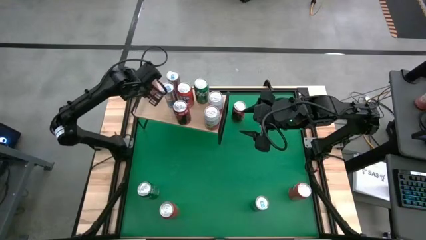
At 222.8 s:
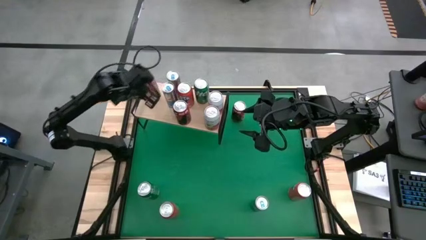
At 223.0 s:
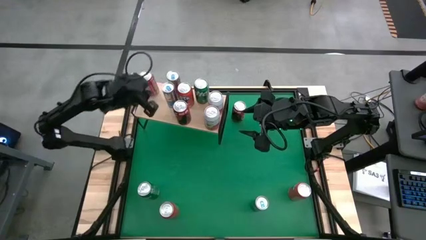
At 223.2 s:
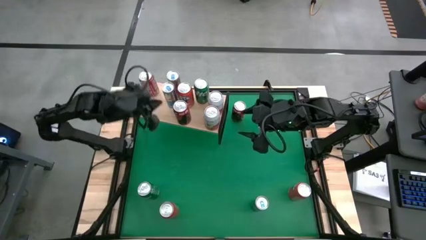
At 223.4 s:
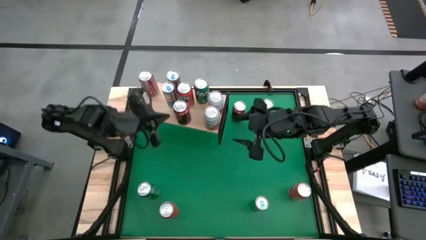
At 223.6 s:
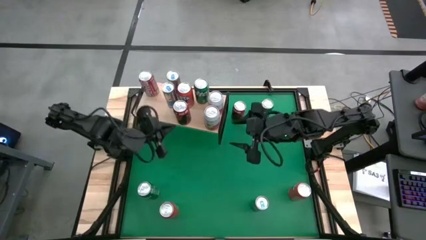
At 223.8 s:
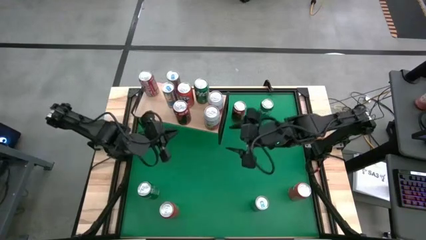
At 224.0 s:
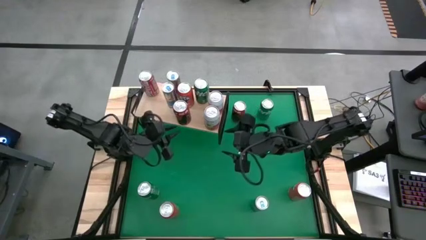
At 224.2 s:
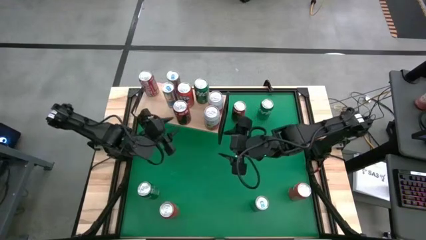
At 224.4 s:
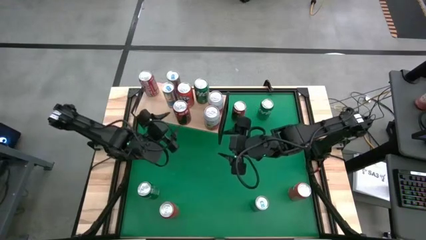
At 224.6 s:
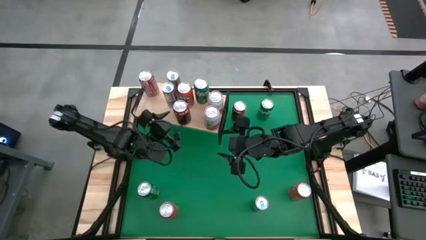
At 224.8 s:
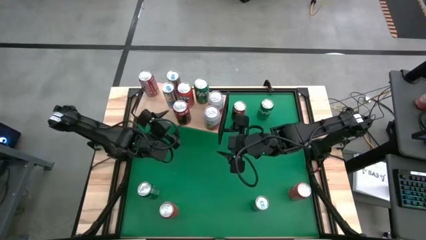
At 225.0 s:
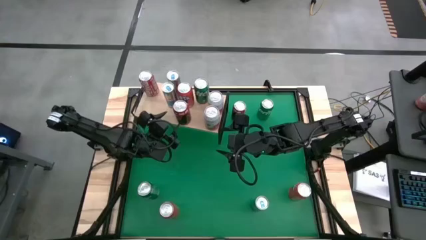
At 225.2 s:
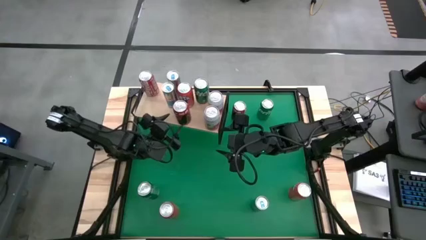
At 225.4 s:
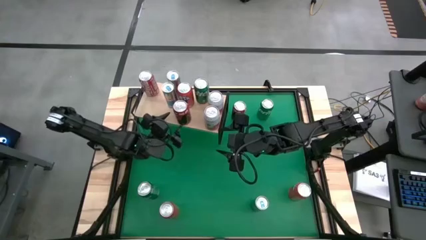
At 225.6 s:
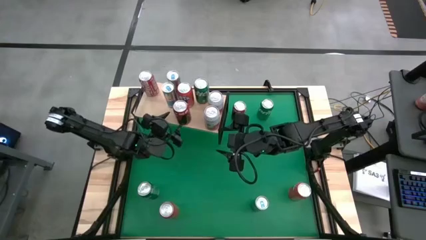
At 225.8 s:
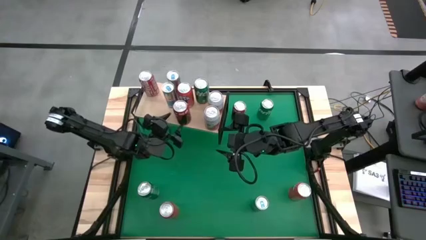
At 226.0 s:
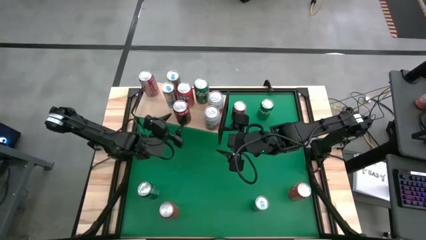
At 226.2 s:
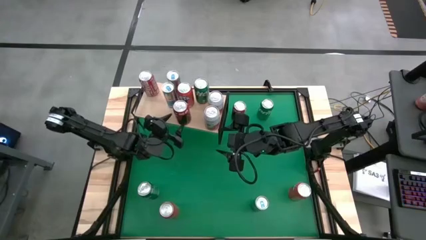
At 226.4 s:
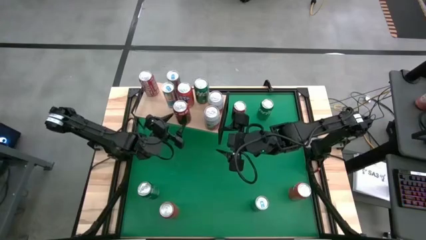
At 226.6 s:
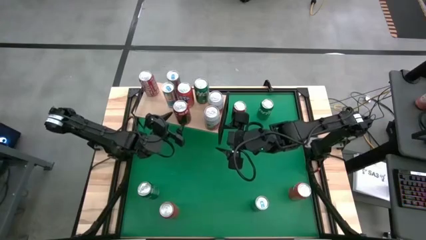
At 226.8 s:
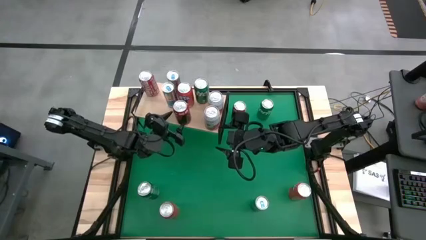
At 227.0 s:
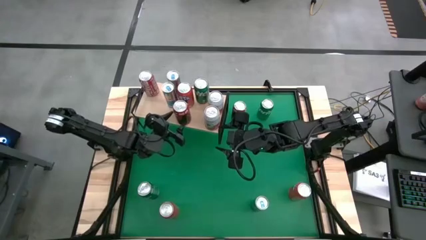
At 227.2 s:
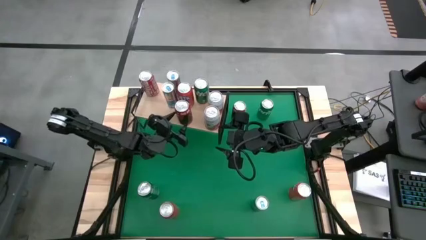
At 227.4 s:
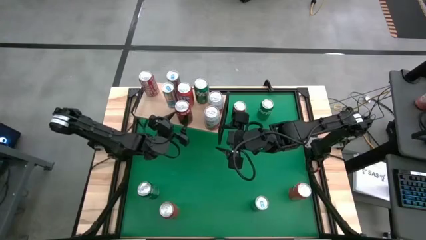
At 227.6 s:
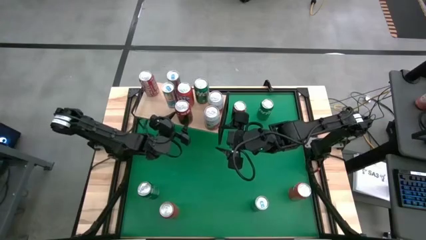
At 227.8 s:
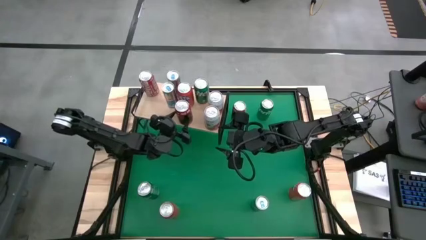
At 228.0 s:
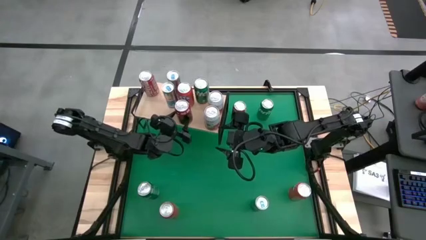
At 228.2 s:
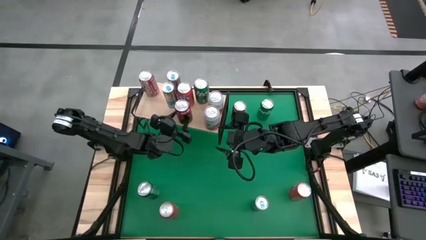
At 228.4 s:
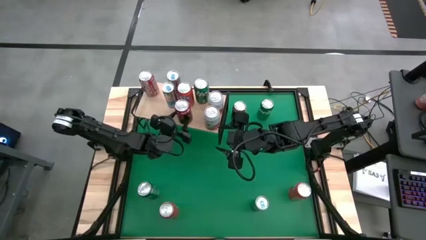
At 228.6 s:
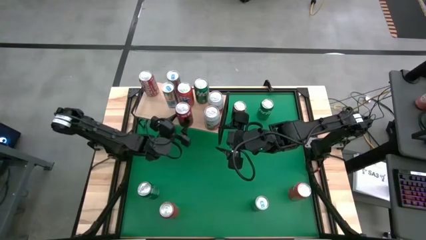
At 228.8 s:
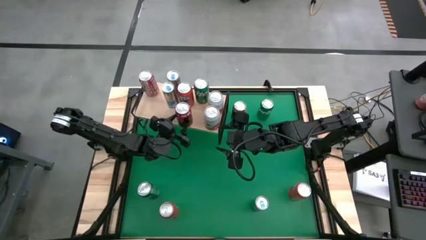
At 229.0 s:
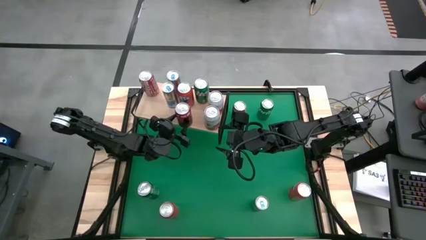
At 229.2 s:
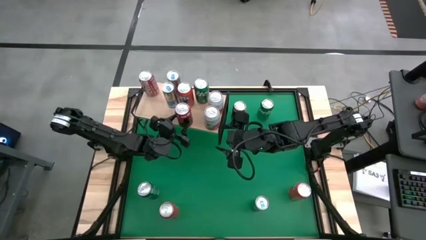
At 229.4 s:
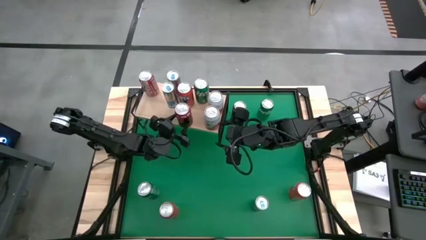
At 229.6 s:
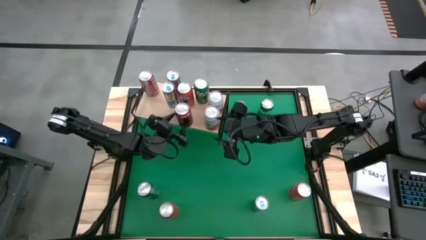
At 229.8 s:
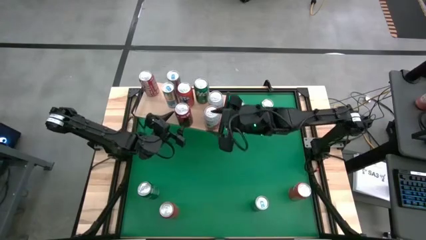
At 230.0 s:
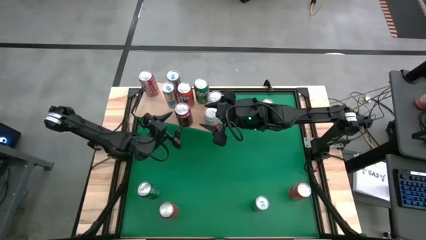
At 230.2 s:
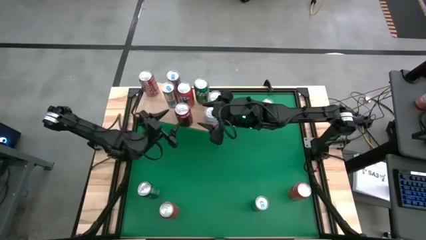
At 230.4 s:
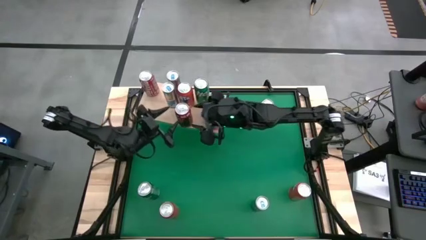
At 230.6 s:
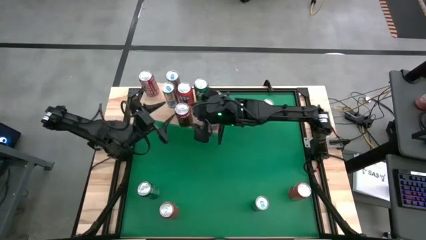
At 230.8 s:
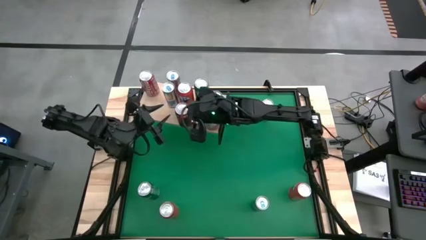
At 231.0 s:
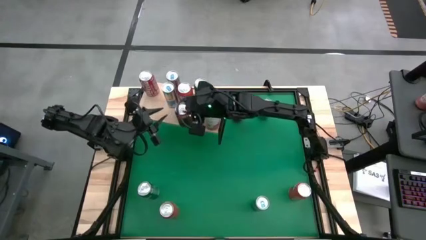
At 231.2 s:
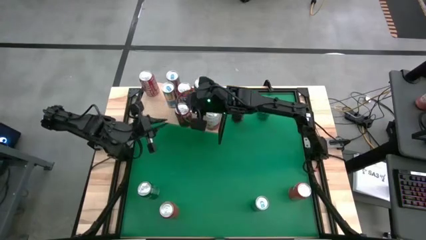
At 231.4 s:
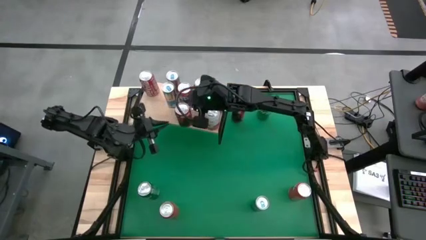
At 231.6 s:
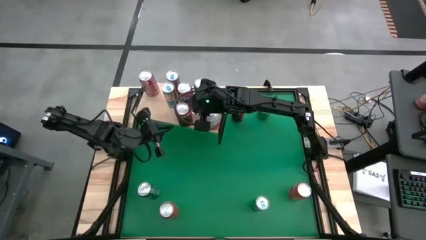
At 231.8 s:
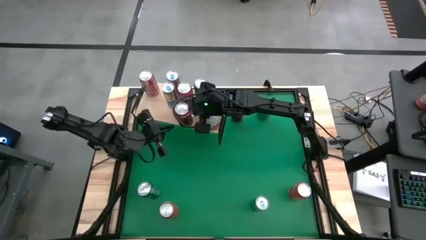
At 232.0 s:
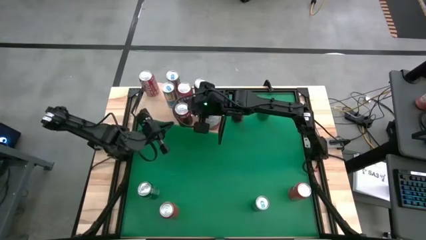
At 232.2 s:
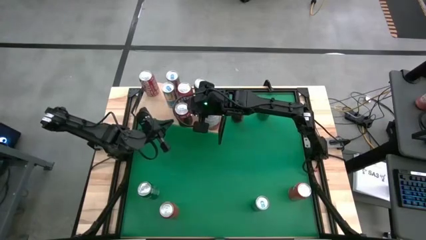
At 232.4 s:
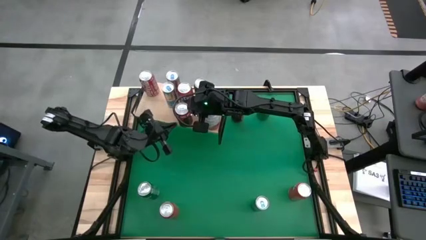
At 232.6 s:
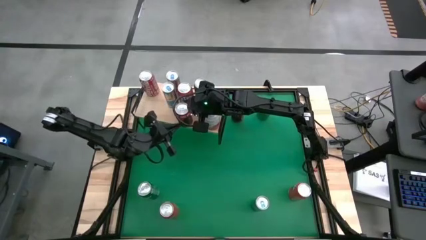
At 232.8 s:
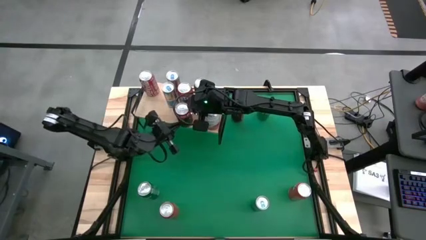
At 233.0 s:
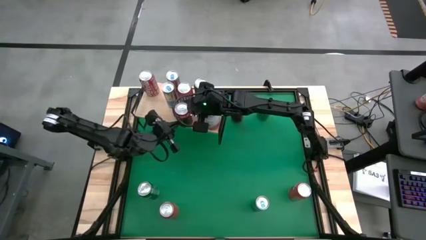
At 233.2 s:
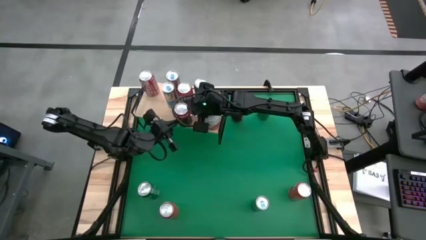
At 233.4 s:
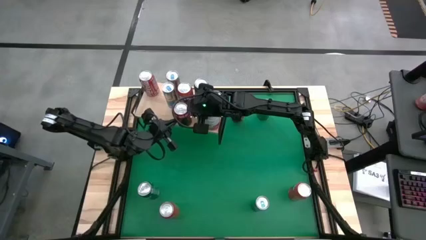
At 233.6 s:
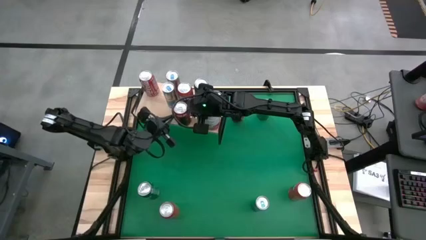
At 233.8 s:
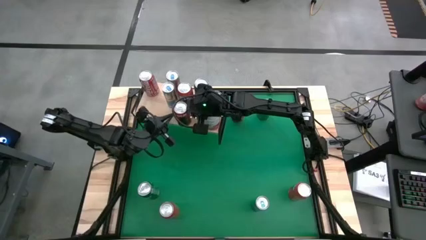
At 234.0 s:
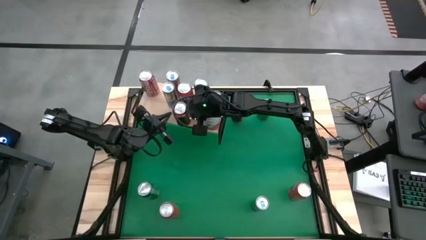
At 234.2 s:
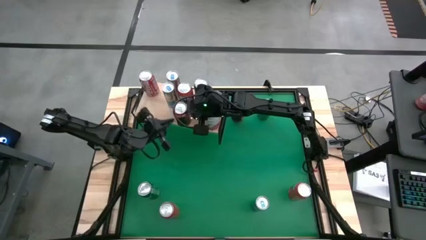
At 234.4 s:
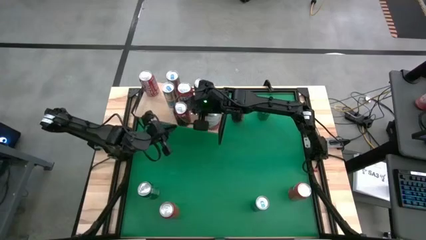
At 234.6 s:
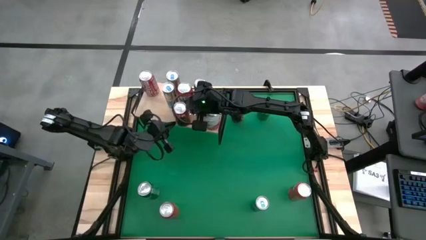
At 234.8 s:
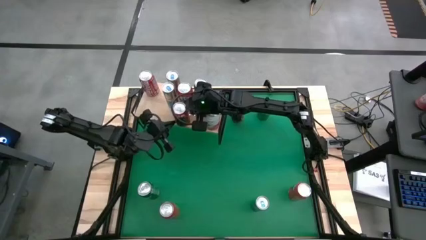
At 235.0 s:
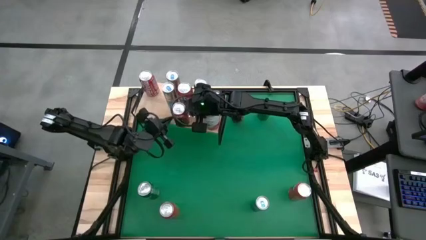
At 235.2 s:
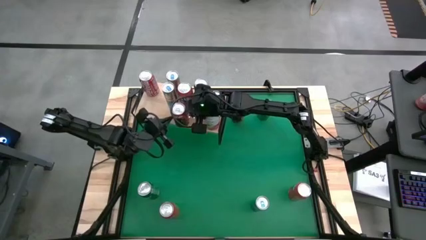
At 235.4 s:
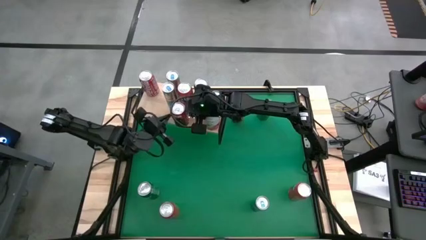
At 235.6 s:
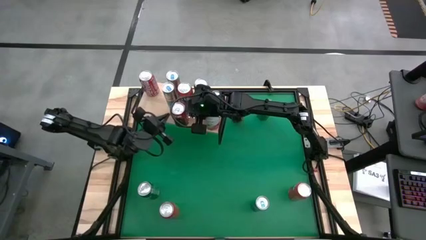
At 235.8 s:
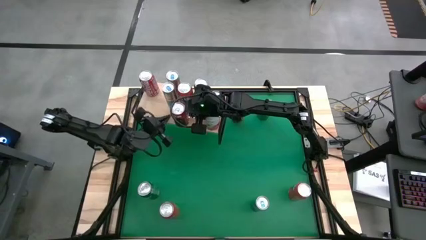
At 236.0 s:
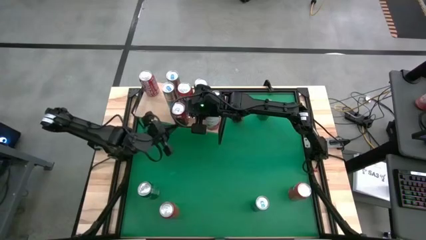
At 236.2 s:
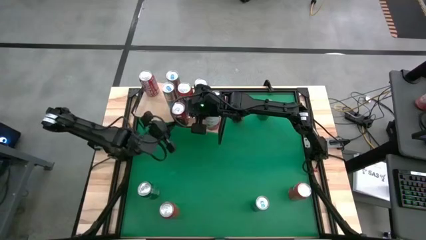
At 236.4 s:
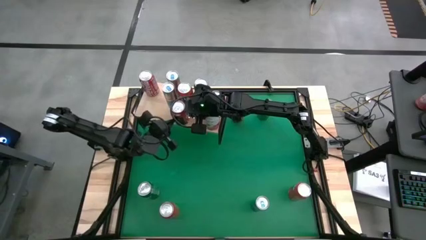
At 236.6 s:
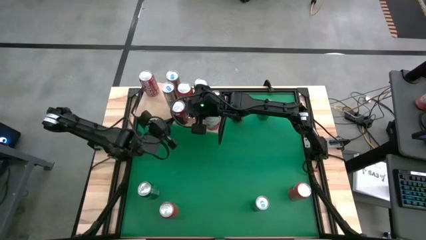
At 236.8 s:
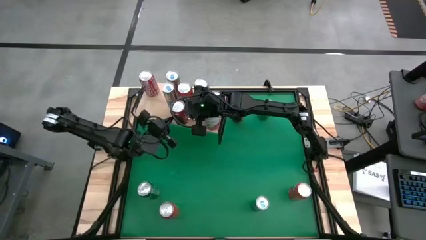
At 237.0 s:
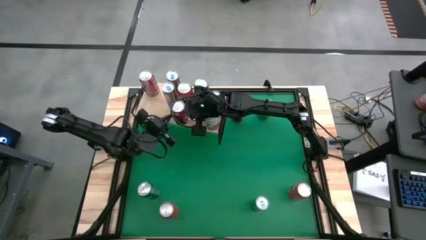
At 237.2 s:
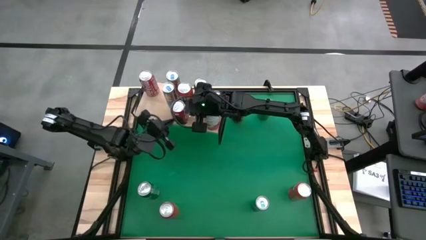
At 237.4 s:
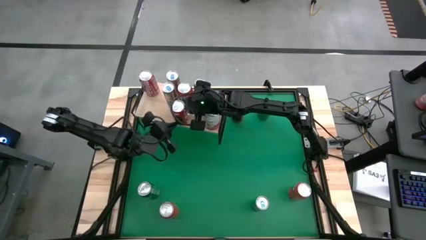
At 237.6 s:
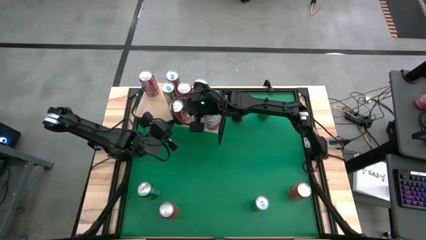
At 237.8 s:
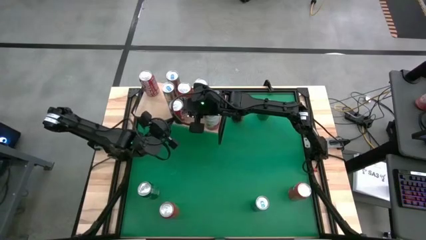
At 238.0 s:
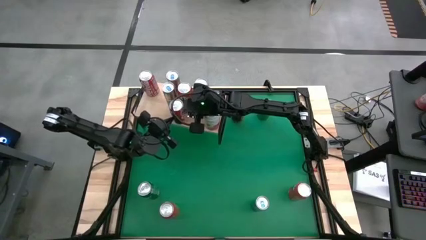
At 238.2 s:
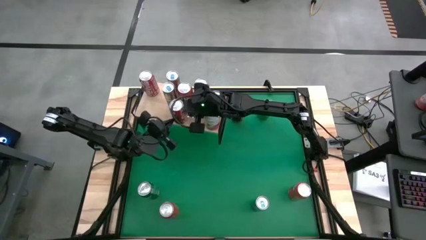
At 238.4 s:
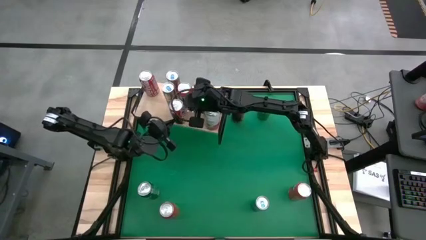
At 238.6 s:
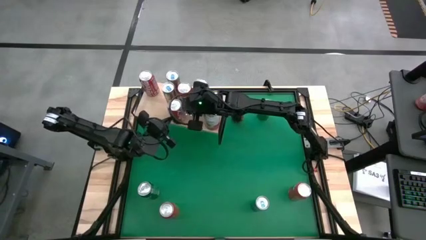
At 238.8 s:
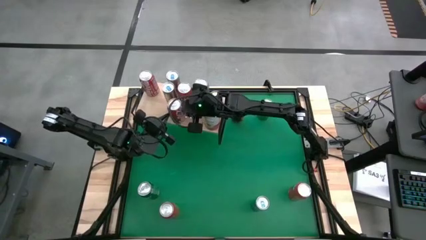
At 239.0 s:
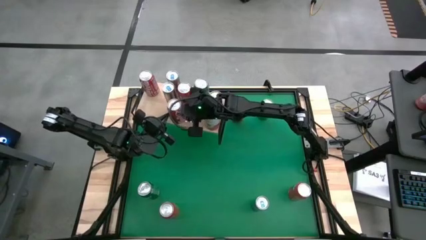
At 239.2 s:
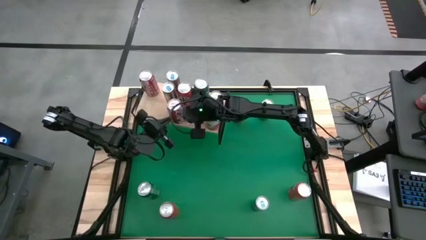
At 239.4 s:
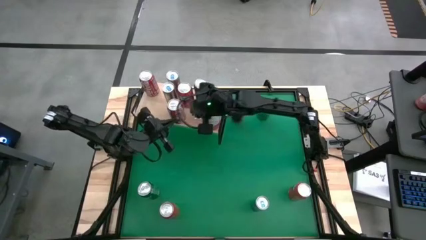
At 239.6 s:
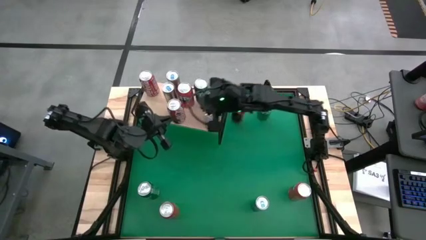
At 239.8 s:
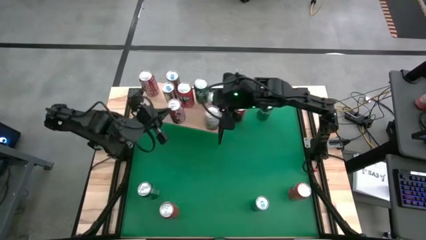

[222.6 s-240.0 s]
Task: Place canned beverage on shelf
Move the red/black soda can on the shelf aligned with the other red/black soda can
